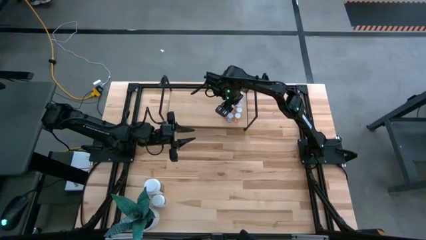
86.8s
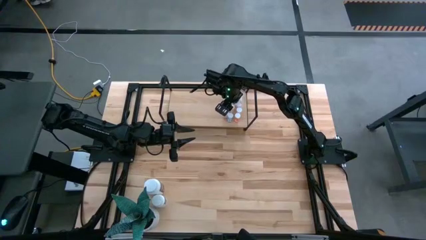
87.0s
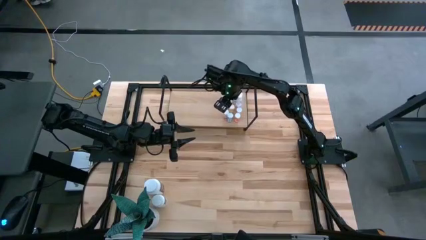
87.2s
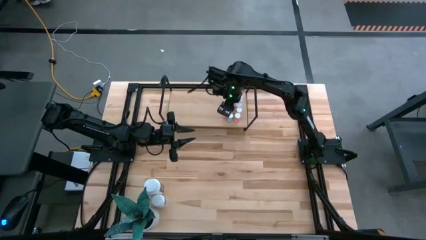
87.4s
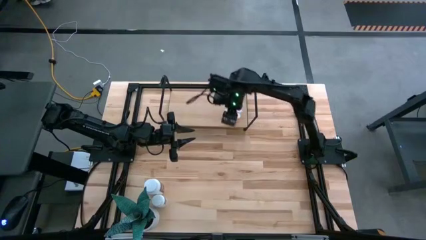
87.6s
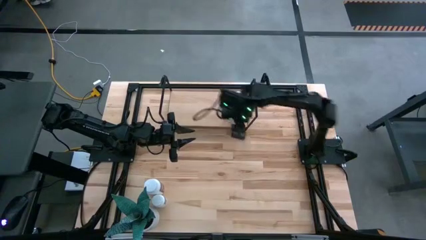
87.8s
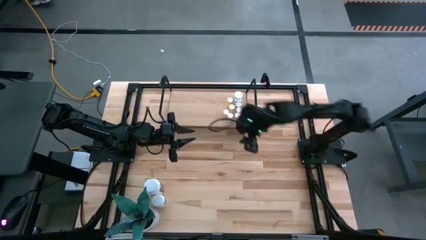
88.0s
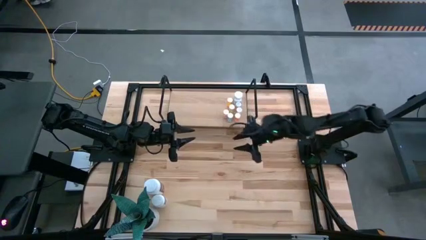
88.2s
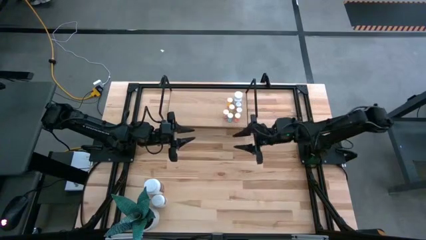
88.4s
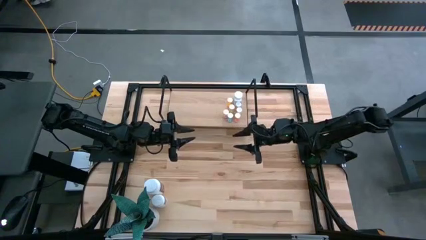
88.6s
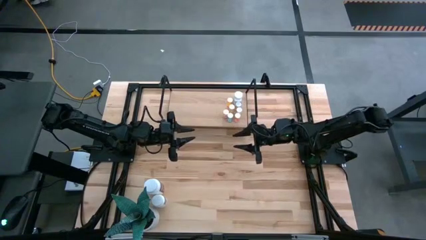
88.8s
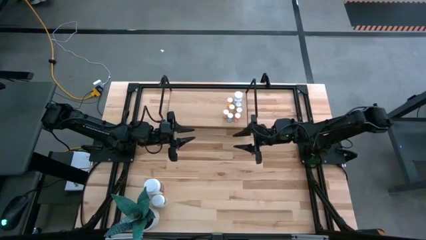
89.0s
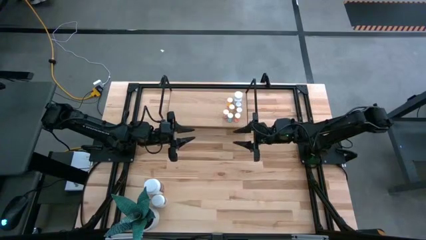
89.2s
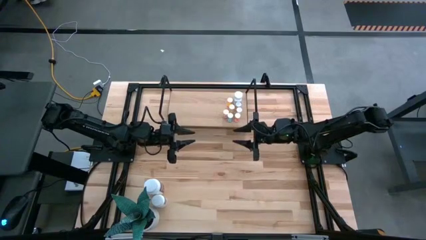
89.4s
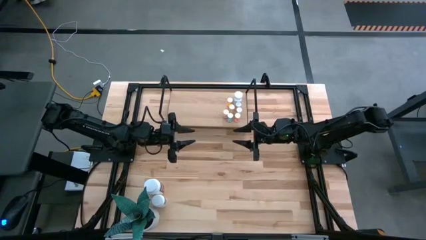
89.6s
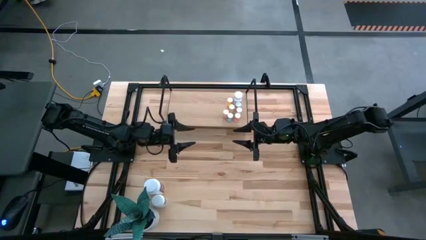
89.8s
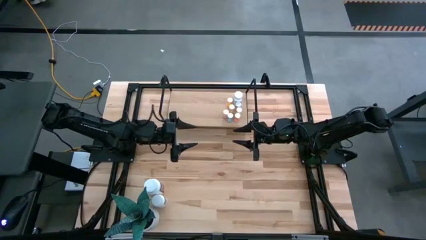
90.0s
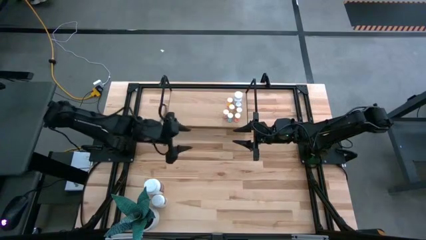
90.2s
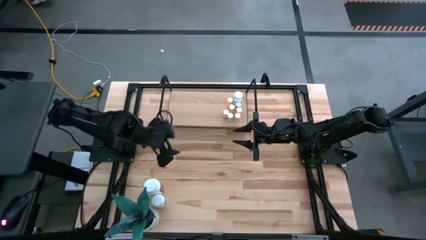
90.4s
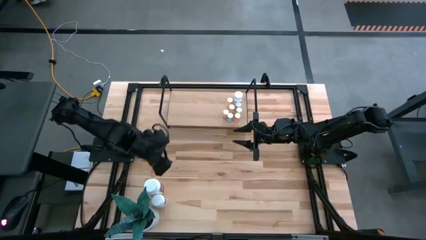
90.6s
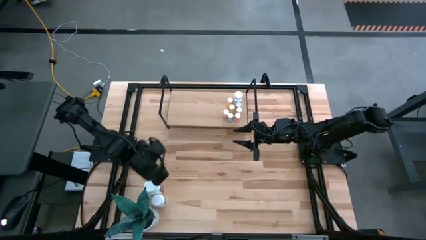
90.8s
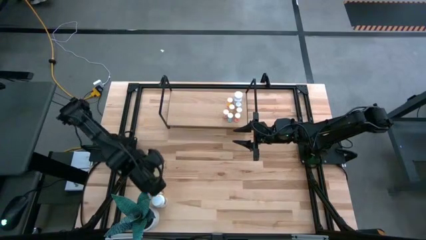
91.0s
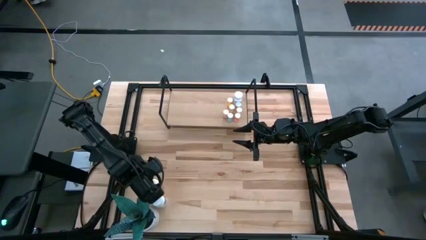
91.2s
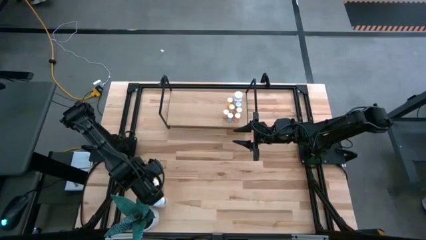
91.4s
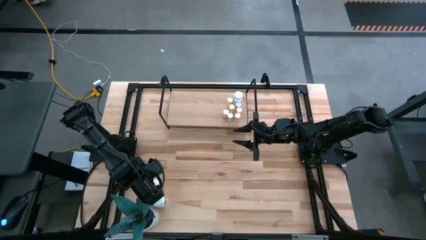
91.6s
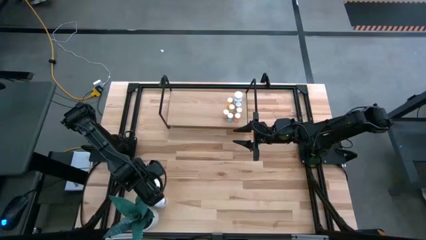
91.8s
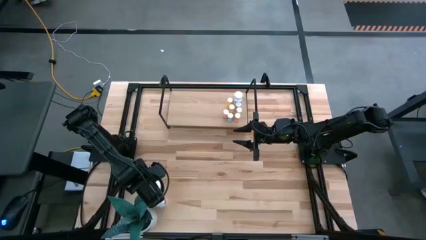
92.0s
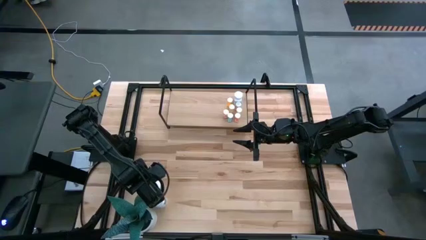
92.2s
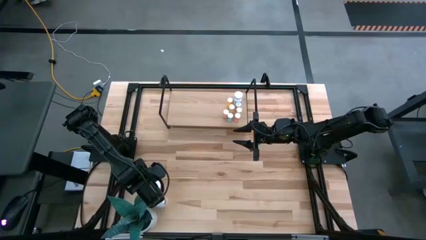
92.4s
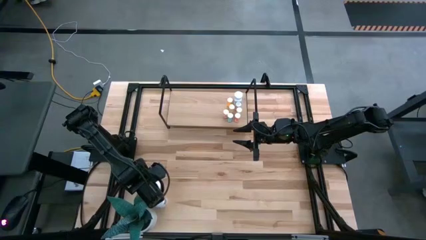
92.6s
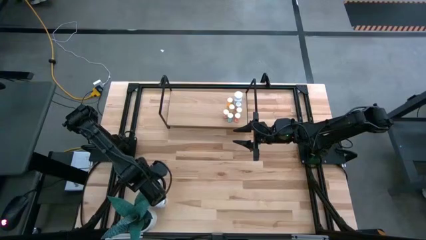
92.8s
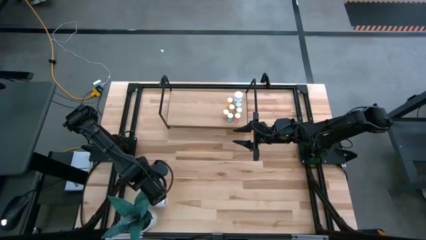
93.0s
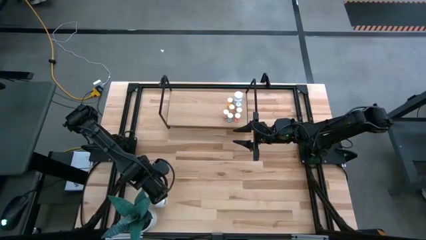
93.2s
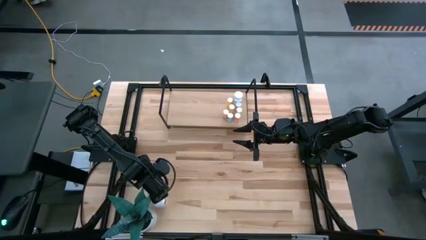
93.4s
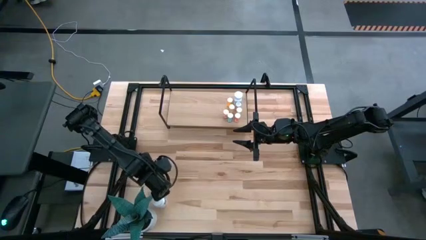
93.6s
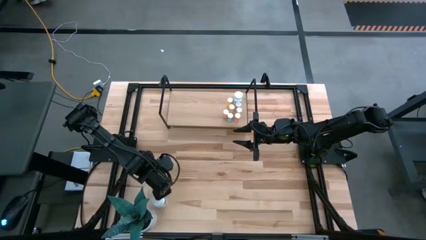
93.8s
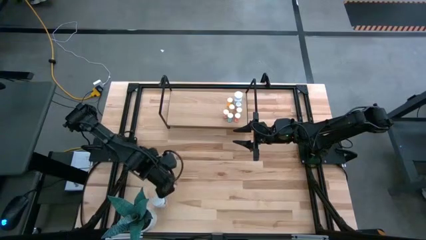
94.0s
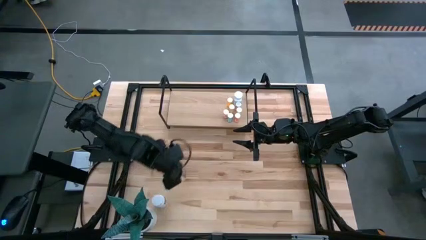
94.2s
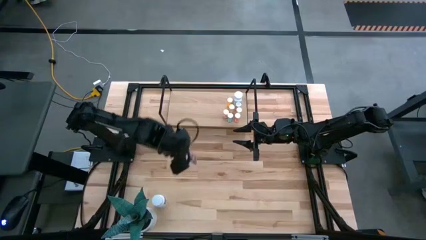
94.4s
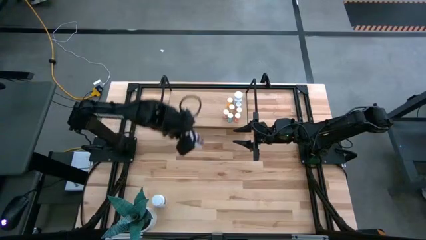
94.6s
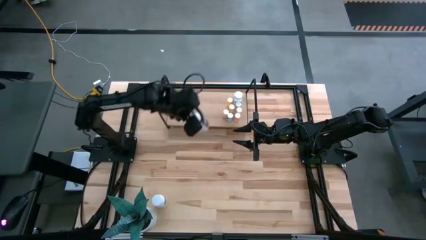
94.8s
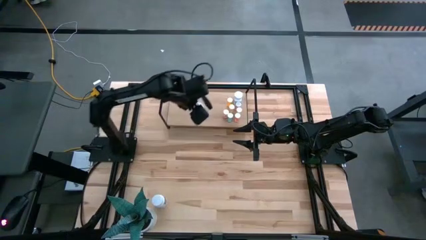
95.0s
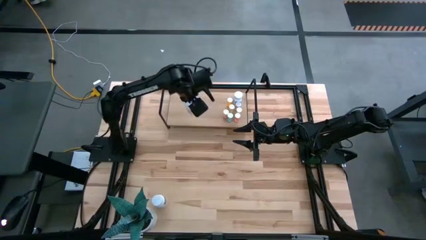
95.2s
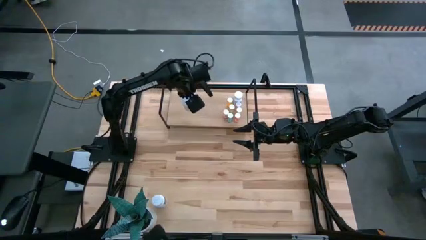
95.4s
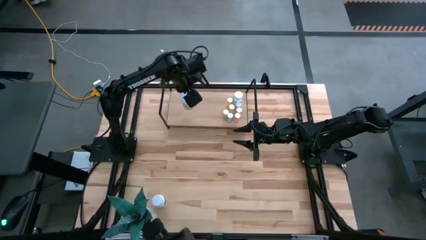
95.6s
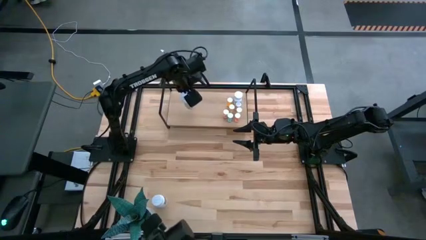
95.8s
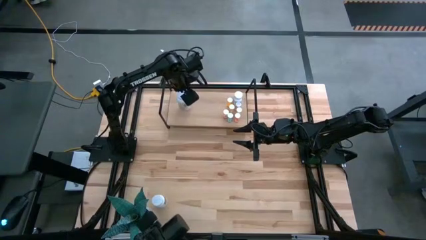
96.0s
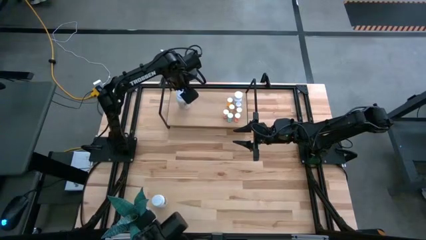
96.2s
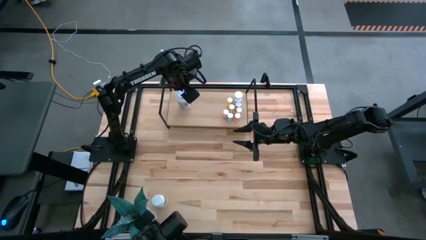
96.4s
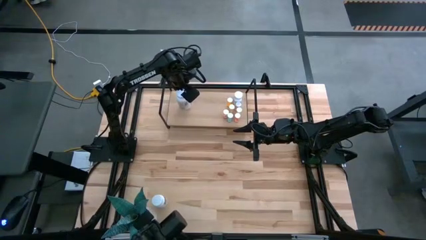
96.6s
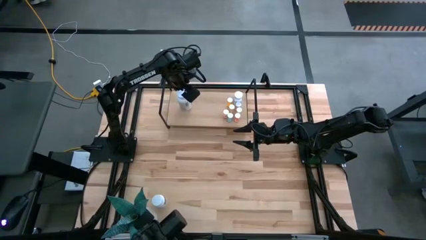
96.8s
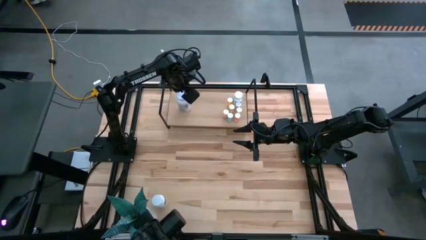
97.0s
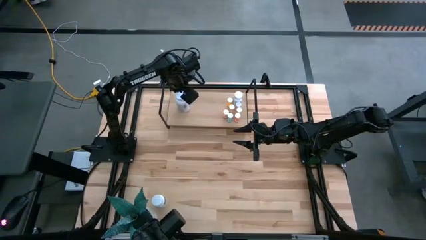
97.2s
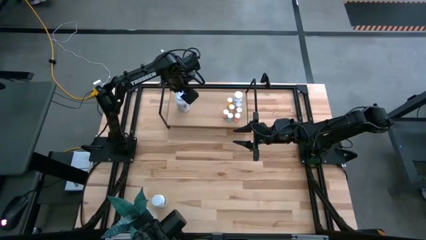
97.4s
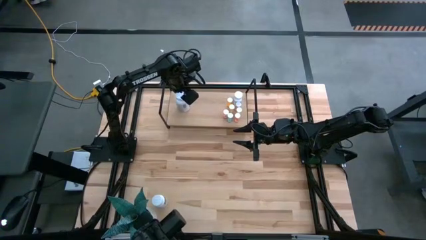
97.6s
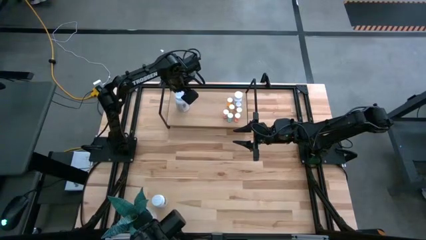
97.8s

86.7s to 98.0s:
Task: Pick and place medicine bottles onto shelf by color
Put the white and purple pill bottle on the shelf

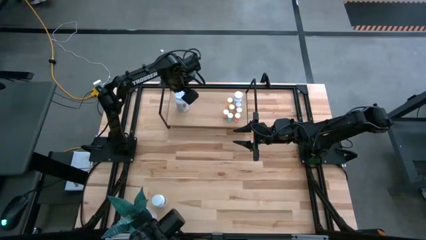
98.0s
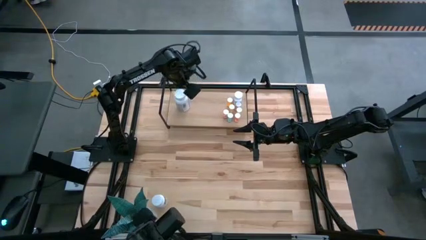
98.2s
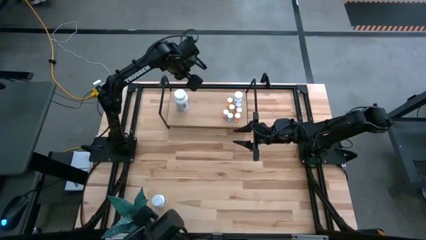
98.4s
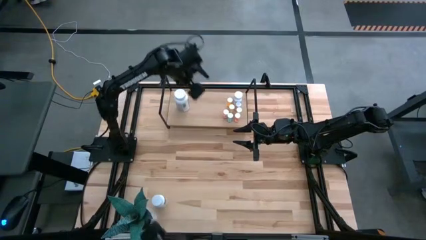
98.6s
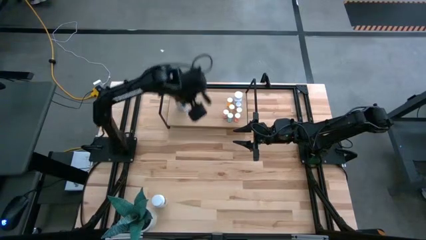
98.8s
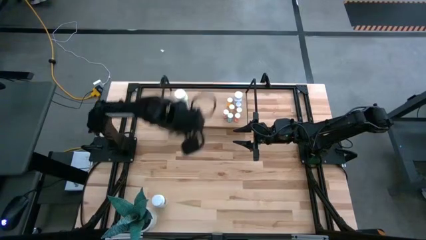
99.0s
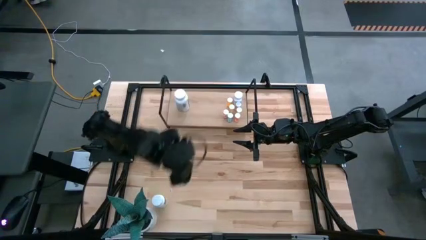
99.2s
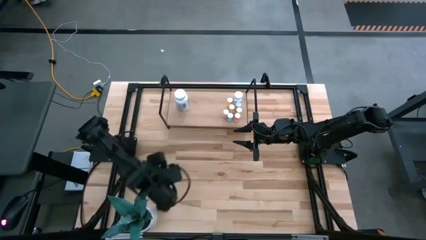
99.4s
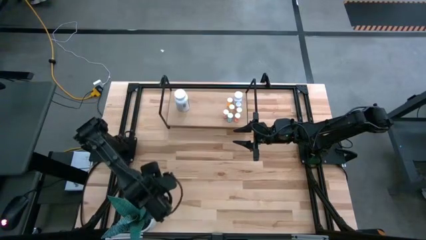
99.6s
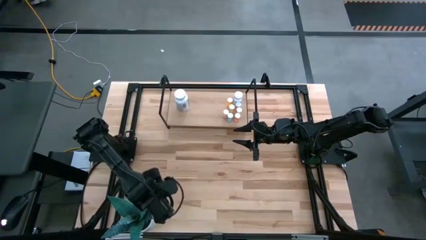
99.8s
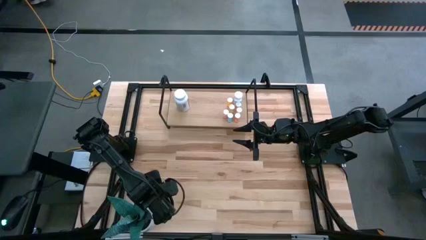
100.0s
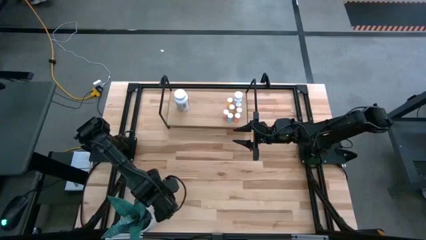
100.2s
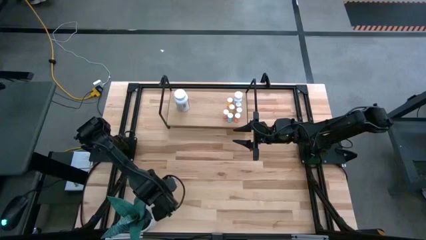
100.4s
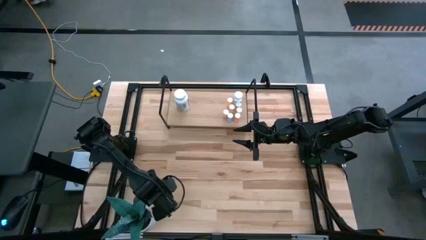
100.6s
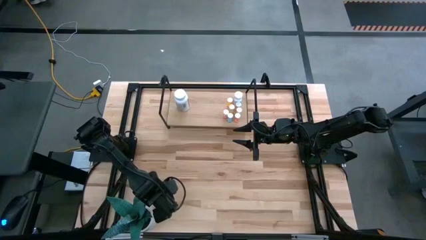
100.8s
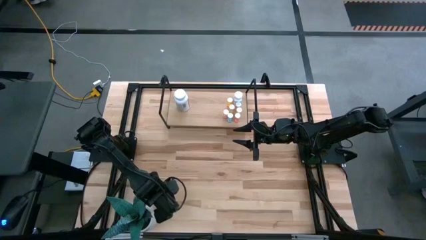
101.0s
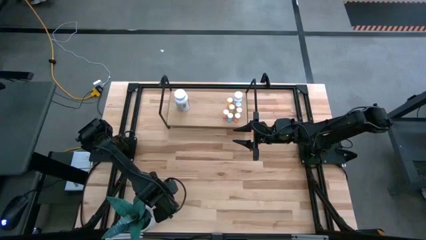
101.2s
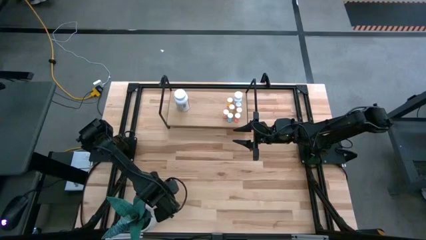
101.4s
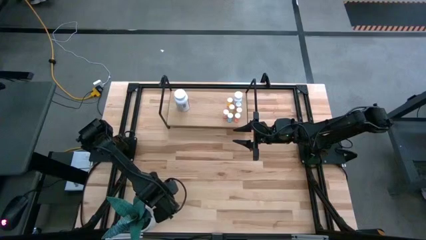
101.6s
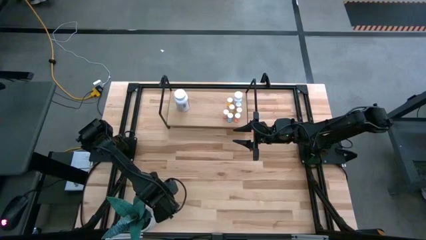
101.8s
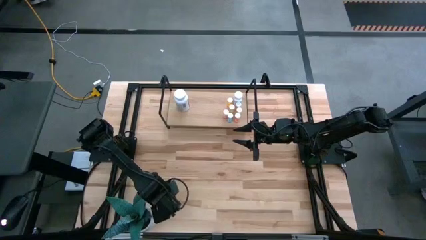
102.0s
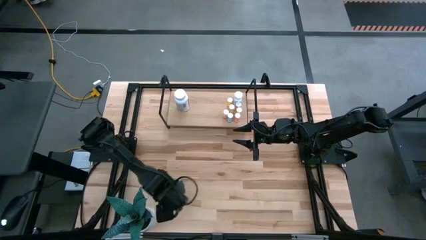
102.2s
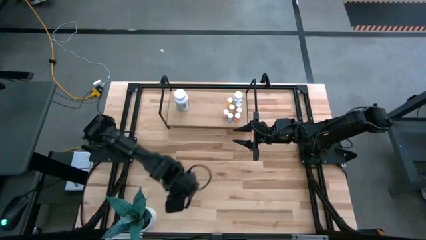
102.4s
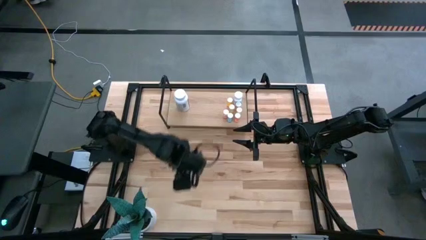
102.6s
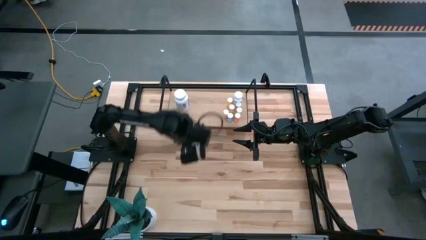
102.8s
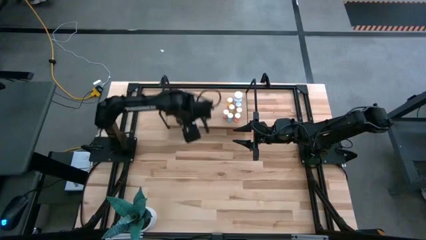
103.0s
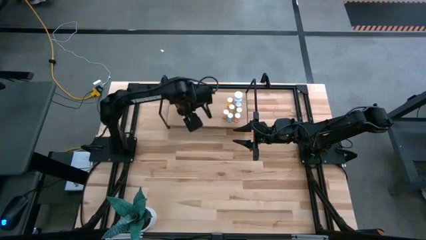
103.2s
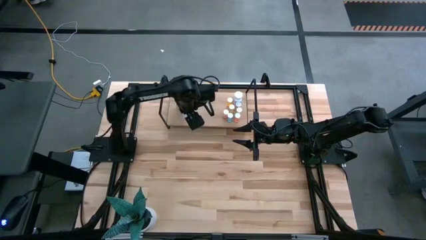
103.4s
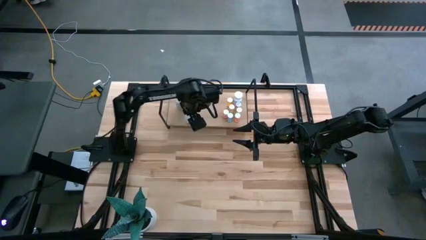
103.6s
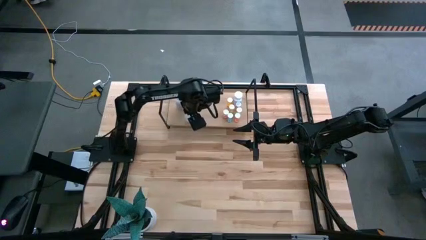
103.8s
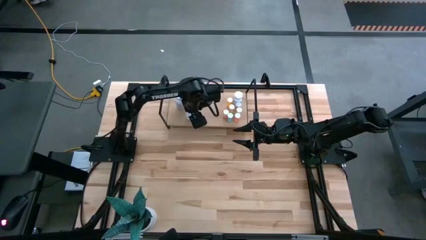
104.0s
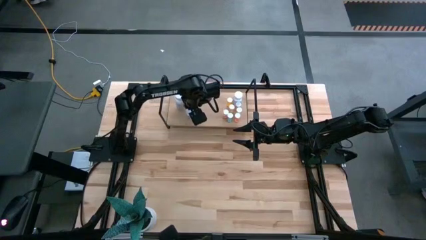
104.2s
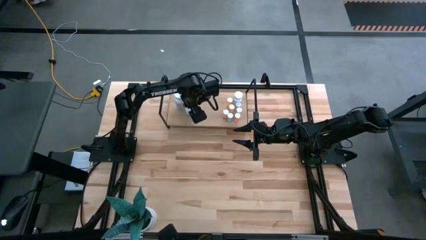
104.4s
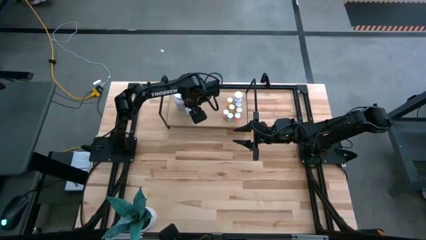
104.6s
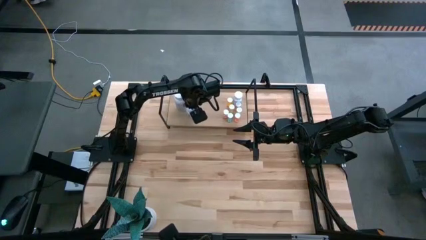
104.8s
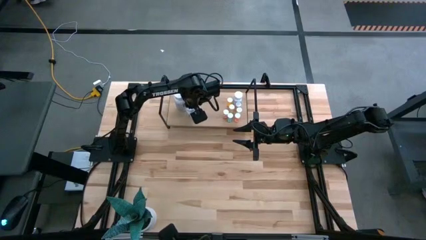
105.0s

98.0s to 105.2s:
Put the white and green pill bottle on the shelf
